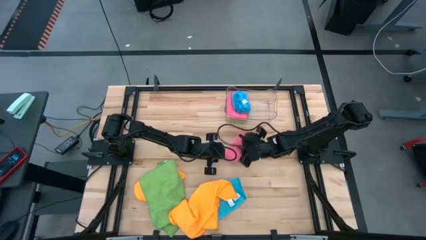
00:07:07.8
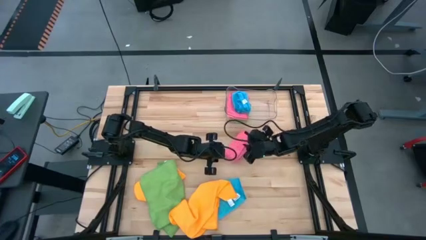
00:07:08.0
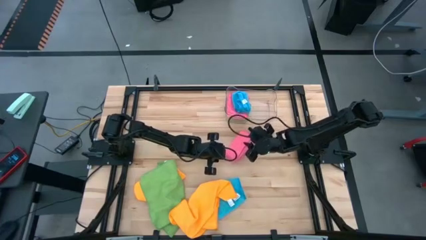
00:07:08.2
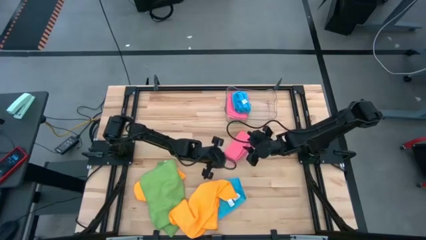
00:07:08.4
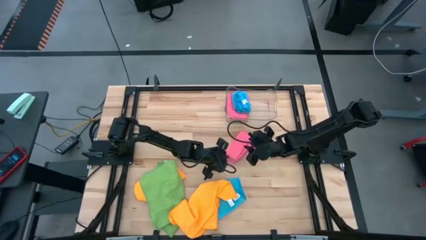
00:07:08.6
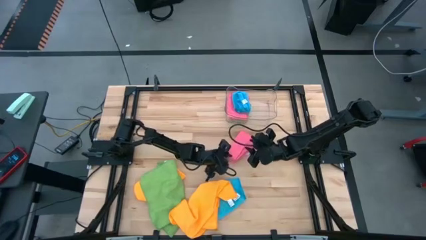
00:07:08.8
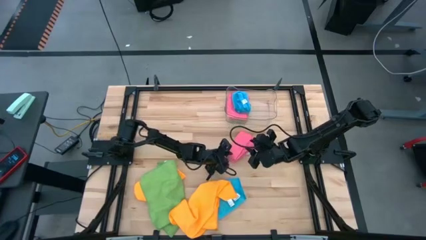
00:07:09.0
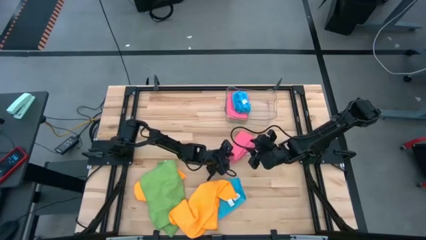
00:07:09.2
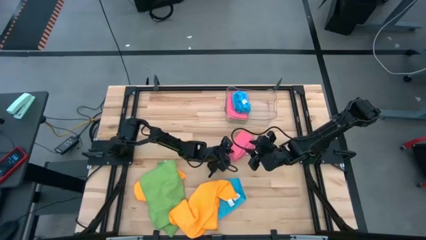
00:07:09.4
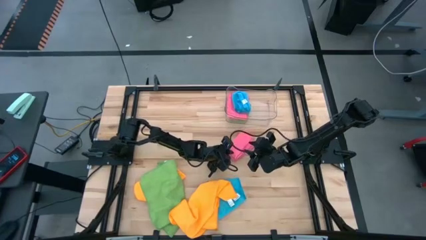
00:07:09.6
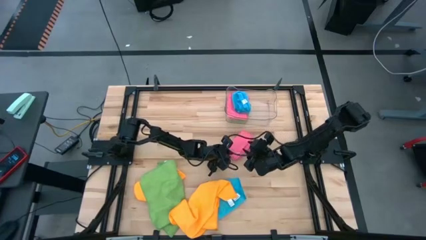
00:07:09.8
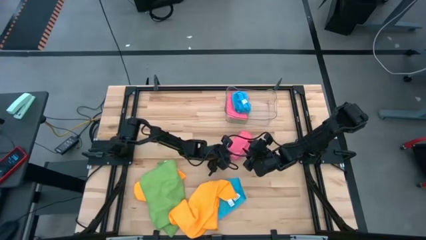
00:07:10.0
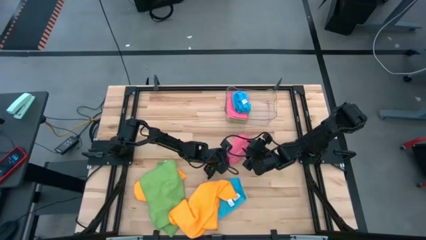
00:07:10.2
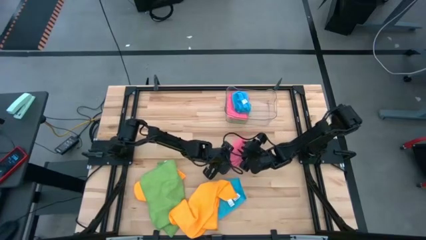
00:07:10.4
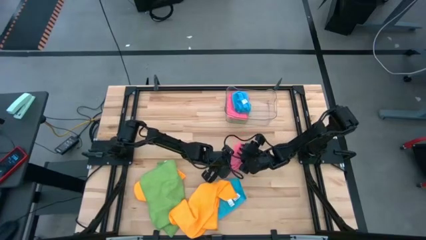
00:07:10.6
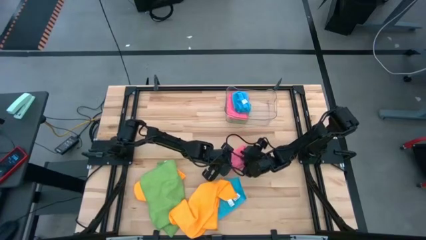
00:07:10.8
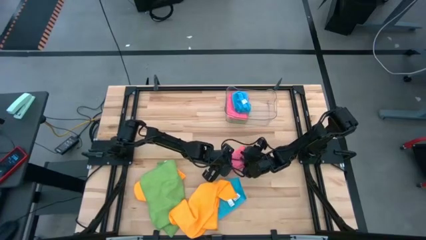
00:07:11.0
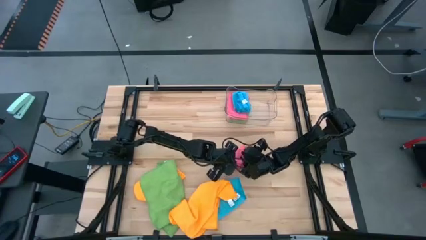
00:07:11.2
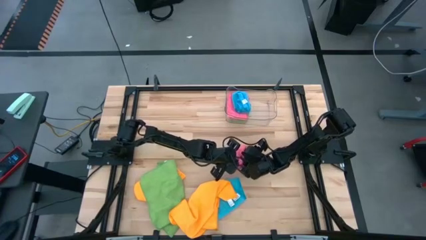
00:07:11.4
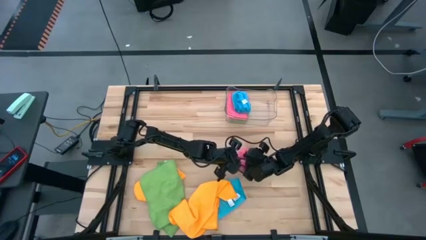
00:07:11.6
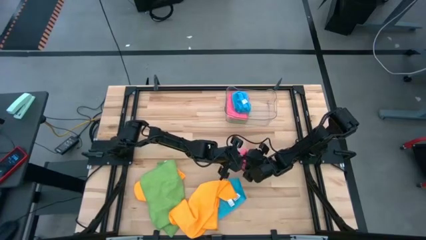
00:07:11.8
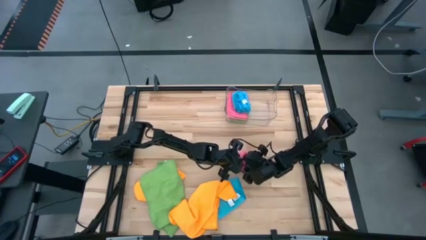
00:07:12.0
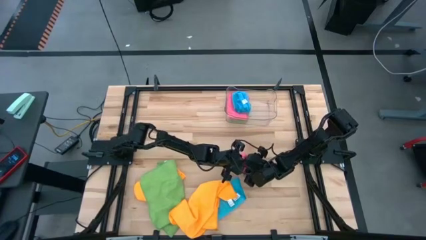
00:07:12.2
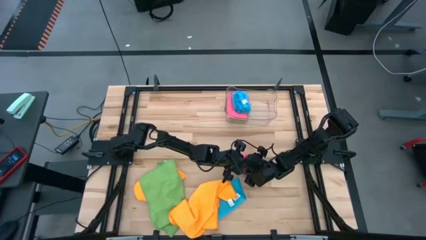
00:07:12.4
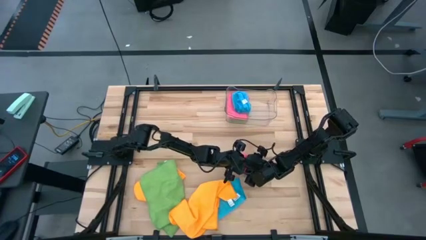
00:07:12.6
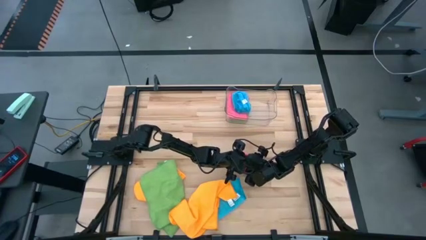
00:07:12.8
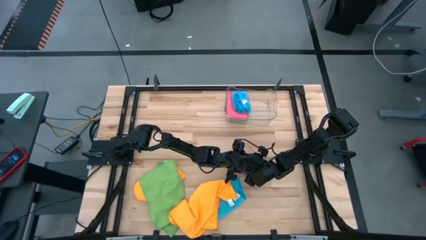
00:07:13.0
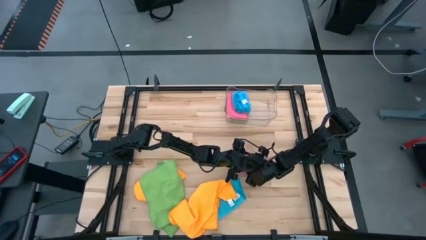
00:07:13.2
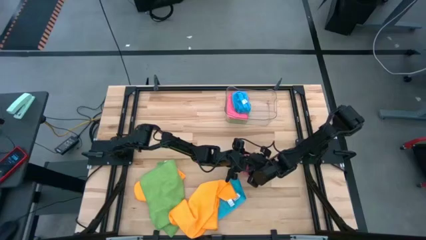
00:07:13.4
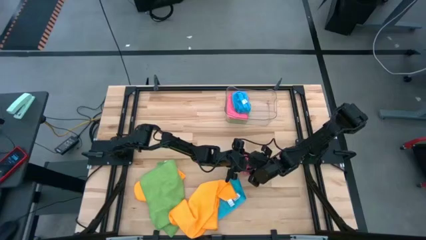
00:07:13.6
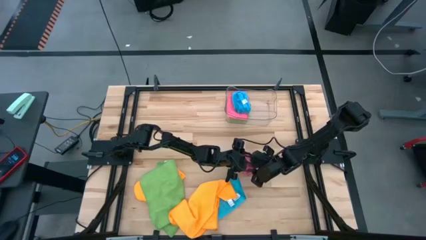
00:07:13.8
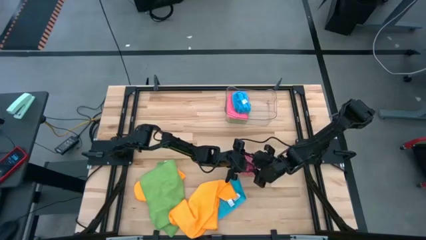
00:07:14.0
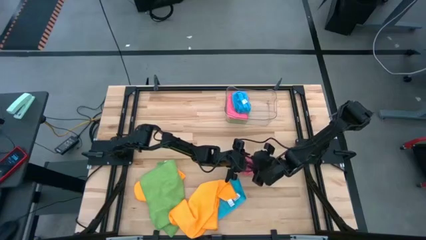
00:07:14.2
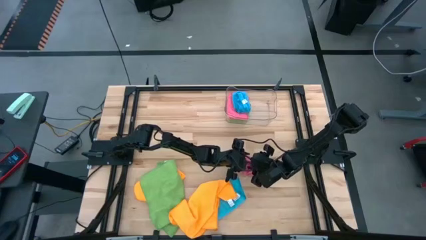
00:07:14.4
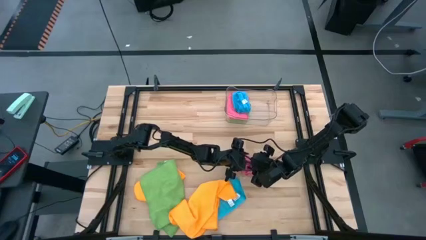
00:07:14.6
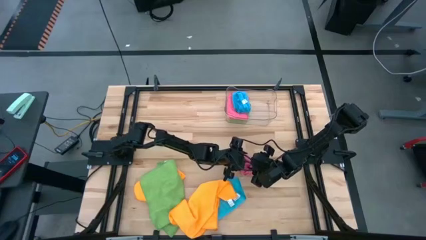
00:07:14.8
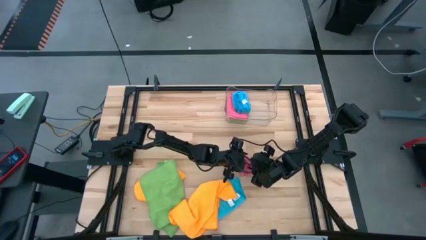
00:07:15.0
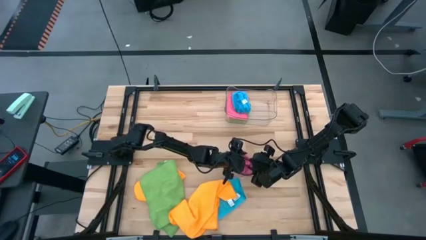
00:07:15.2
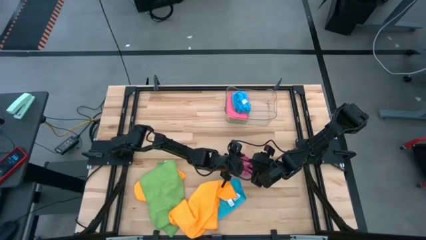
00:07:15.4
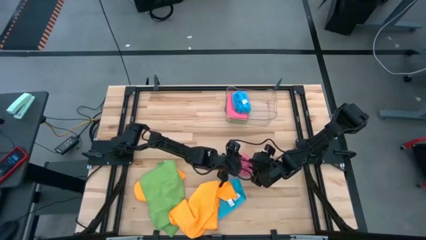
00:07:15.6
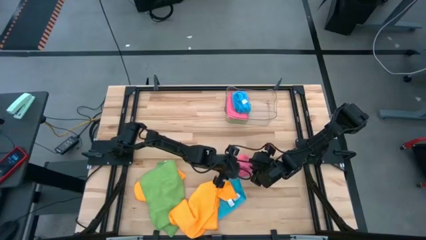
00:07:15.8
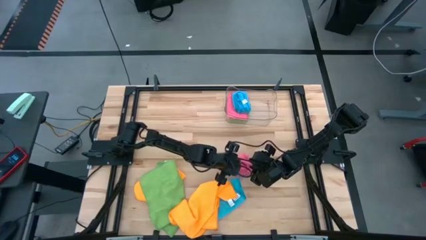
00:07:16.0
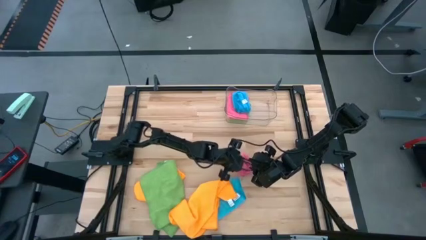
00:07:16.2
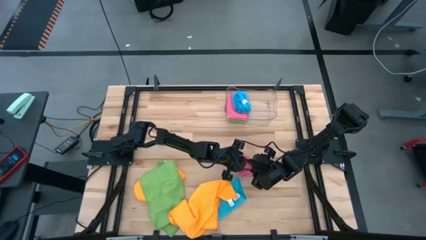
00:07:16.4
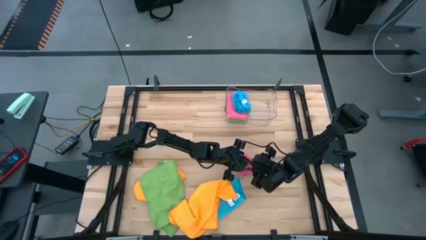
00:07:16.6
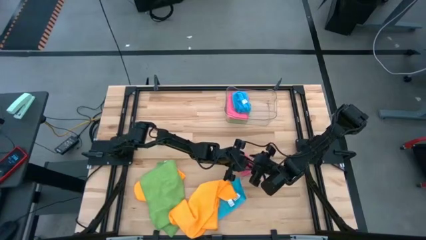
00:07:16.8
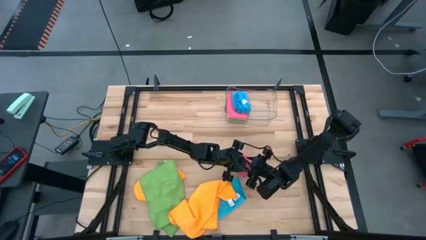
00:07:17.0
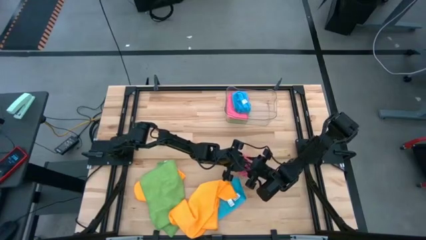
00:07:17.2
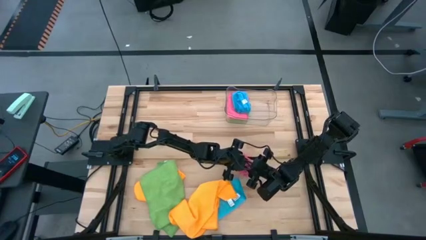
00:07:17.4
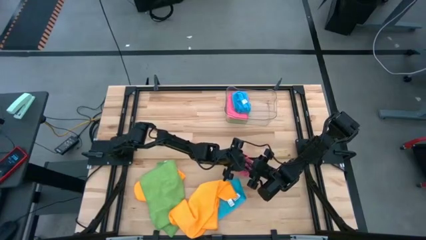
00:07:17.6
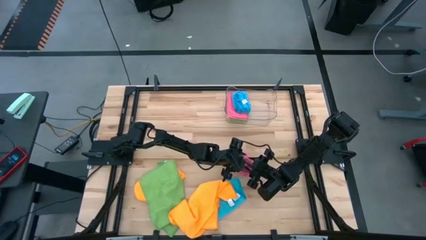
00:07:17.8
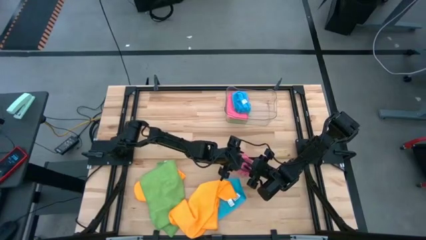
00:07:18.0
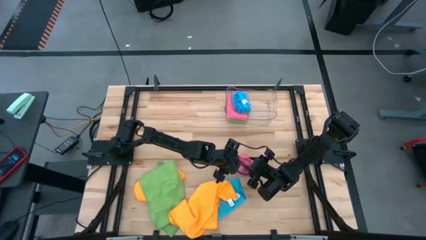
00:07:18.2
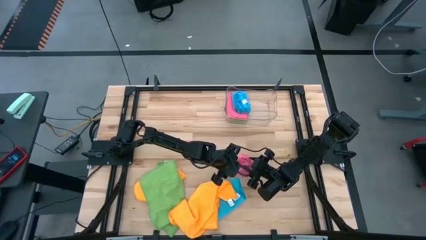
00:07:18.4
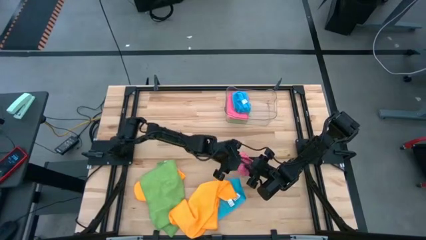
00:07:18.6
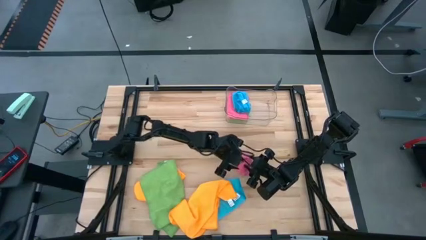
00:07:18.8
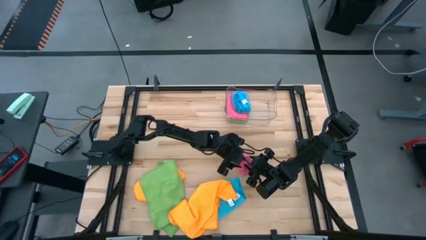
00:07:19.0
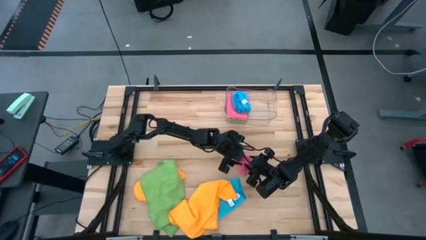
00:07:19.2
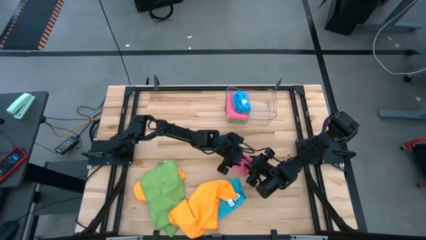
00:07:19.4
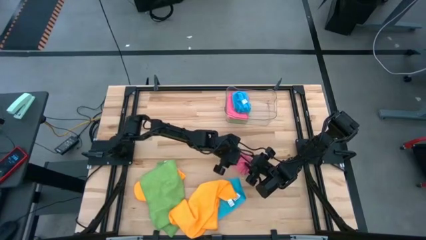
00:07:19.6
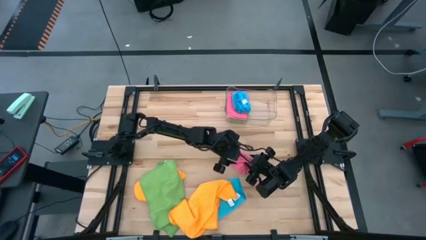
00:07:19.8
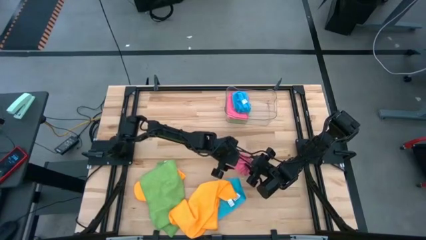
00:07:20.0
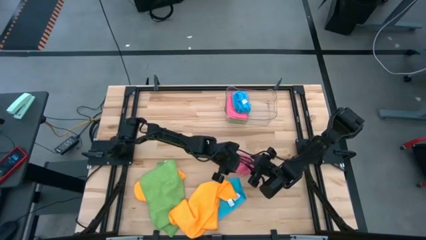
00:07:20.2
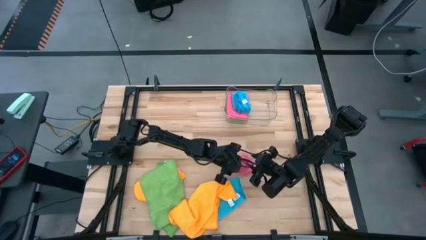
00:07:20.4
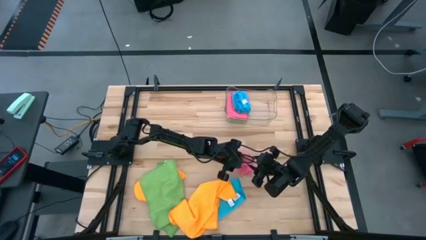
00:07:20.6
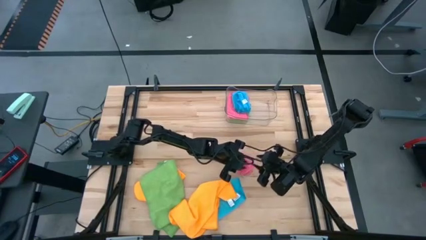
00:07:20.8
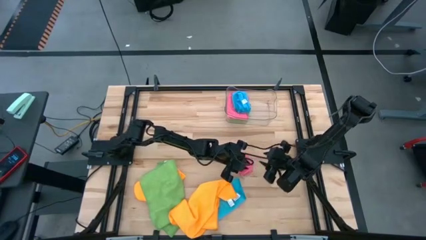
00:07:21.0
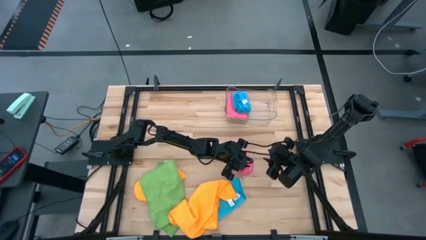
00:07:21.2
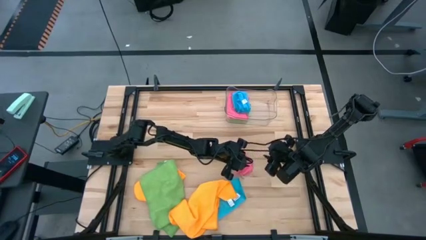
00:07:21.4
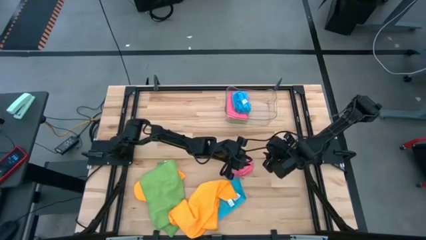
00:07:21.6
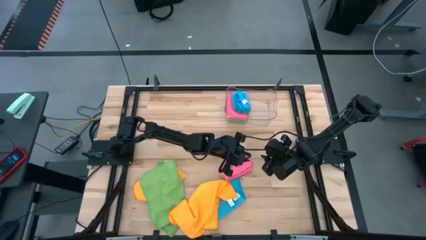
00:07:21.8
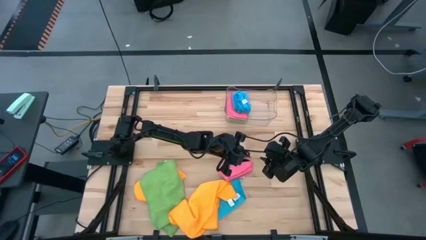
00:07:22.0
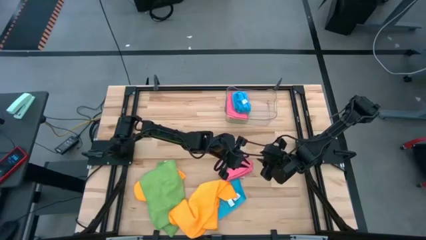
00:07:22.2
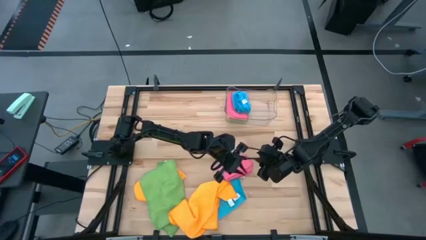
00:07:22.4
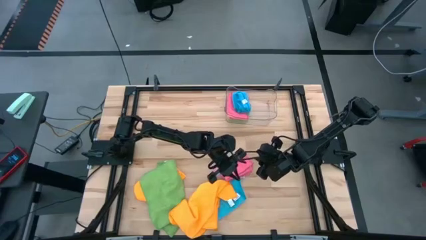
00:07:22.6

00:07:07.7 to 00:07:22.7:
Task: Fold microfiber towels
Fold the pink towel
